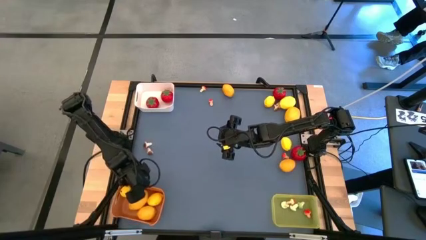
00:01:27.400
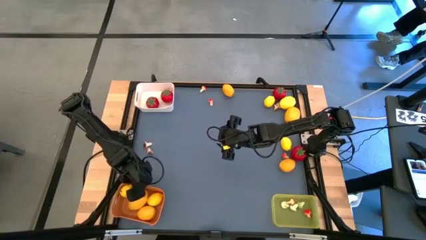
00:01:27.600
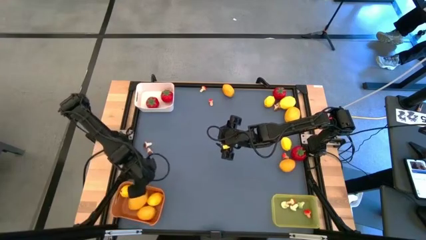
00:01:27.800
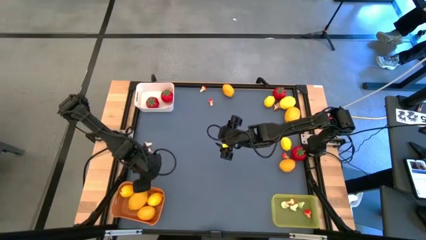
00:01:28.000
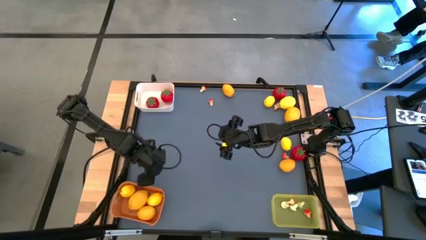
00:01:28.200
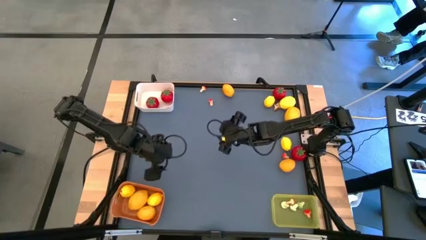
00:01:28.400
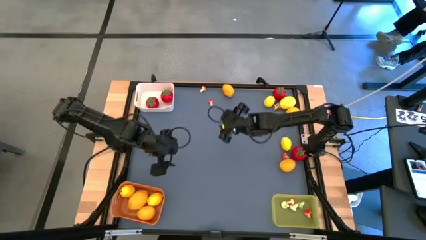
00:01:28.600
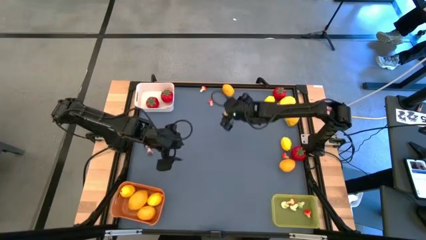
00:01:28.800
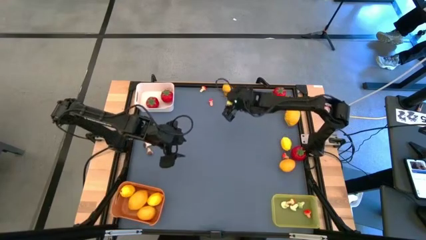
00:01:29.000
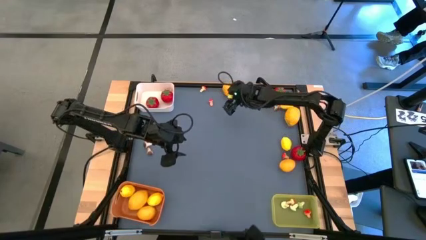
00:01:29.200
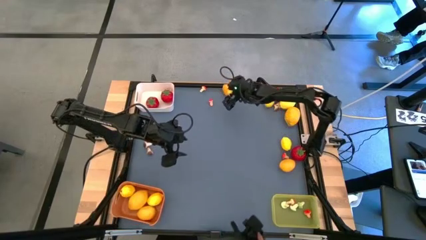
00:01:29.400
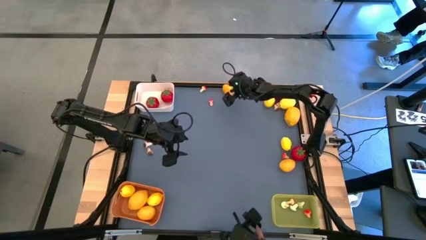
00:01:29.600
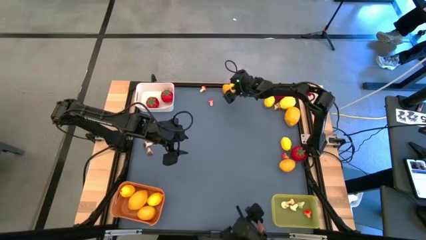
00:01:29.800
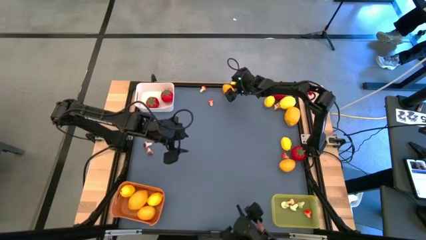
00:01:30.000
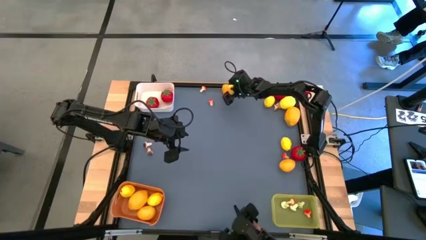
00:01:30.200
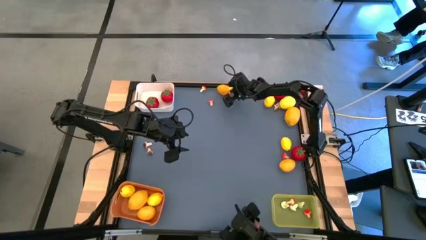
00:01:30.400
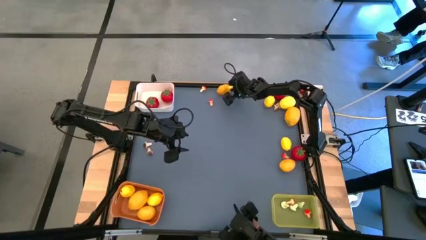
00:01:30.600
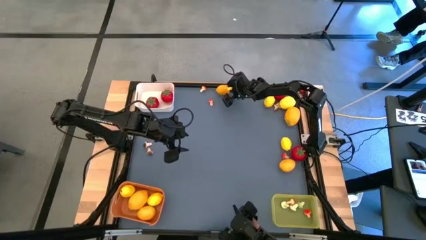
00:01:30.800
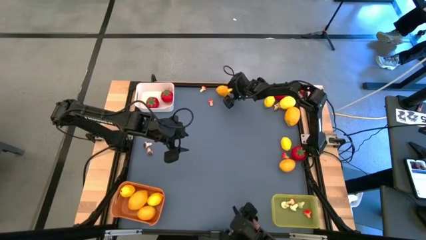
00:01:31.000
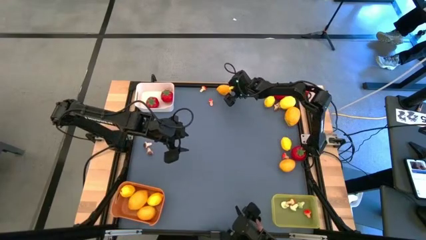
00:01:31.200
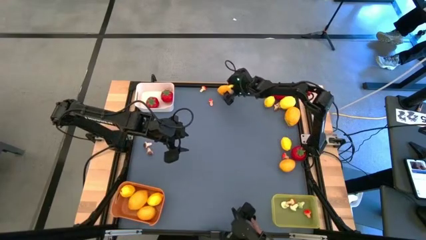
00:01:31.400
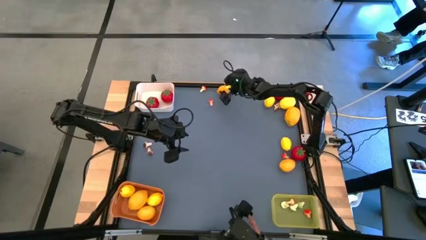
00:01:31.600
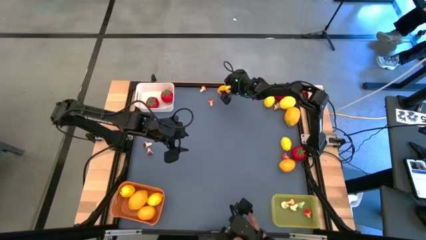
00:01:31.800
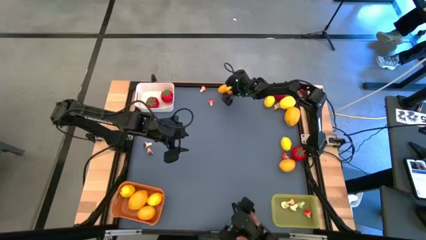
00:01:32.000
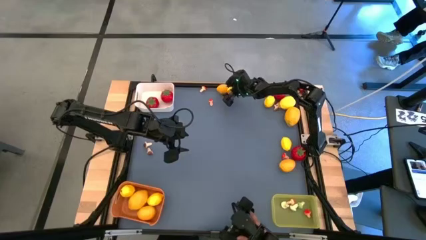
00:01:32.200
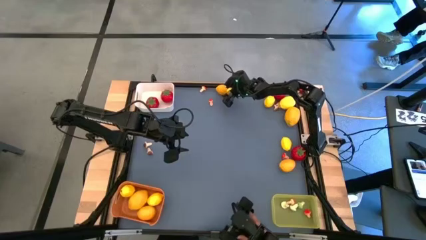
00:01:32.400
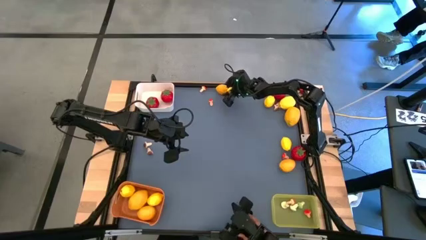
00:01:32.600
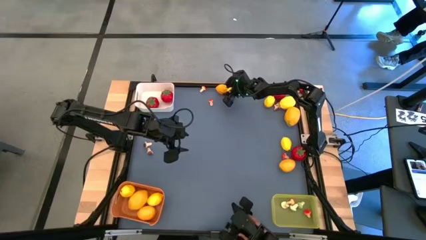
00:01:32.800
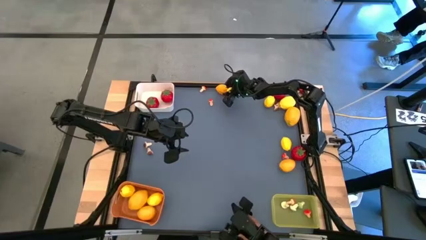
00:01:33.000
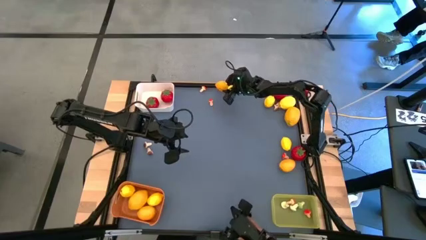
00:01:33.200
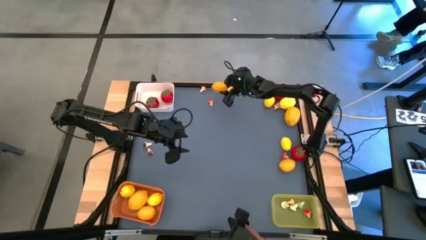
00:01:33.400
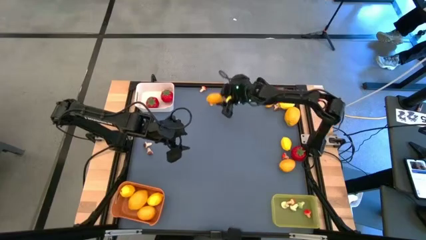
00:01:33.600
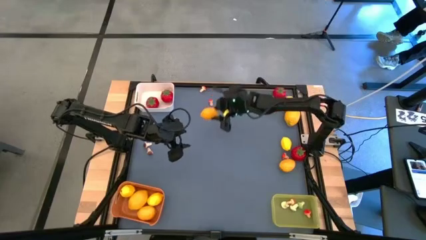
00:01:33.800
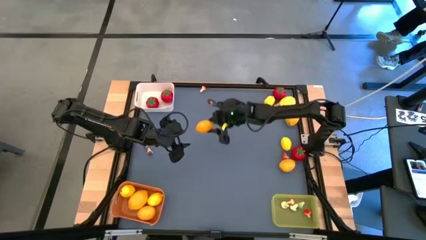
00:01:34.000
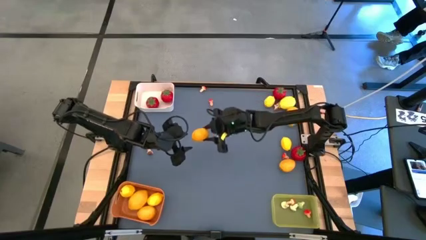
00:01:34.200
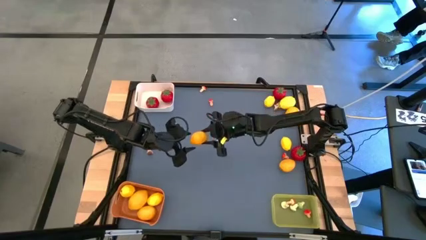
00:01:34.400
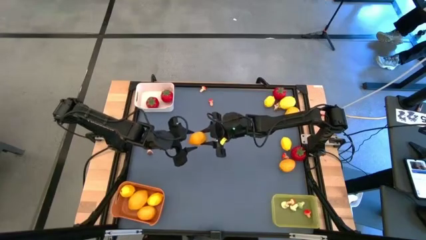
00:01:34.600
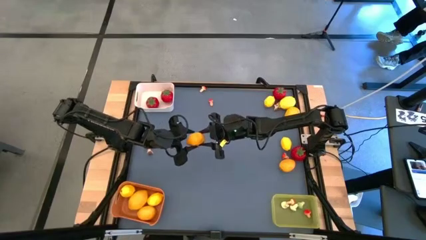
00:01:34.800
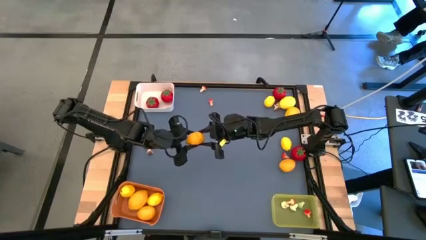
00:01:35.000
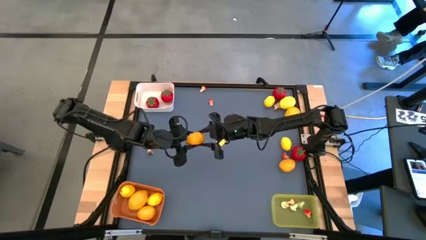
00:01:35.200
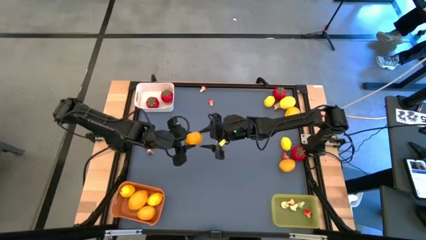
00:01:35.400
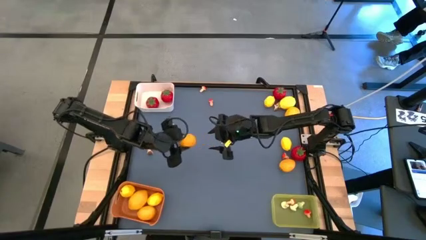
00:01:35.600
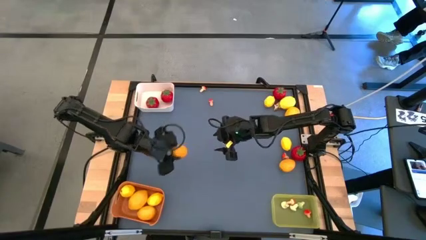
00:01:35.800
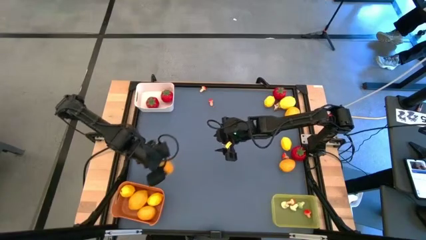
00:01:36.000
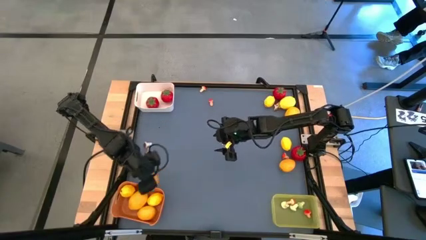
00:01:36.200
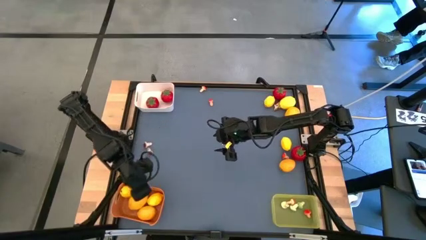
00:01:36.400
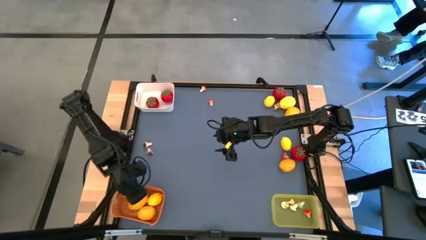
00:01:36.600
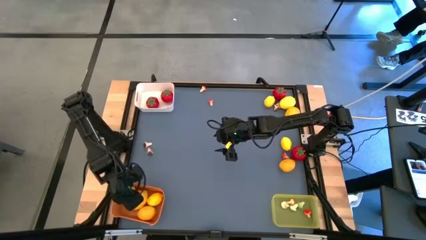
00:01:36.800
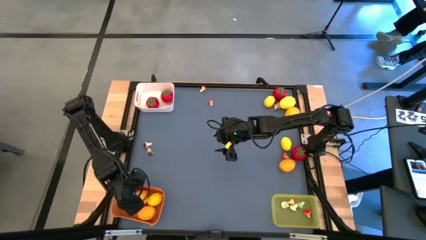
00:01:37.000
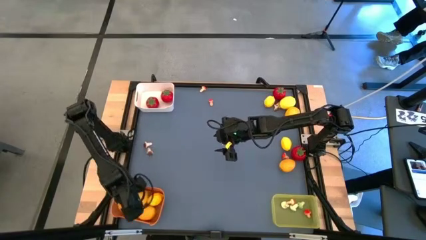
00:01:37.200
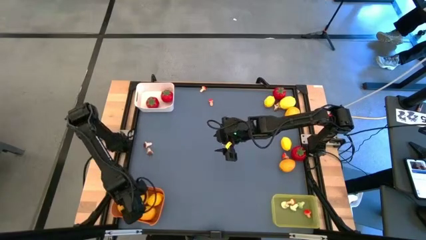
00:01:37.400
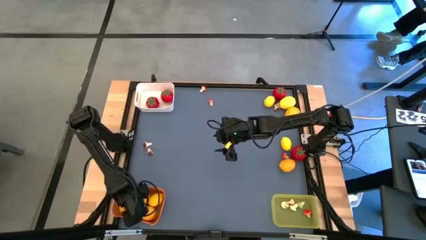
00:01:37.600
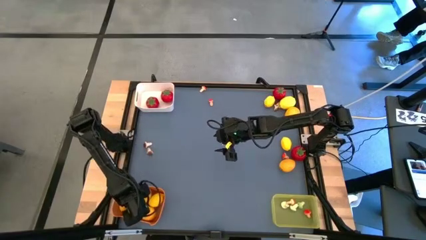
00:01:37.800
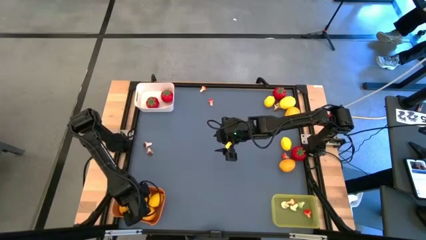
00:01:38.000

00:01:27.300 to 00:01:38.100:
Task: Sort produce into baskets
Put the yellow lemon into the orange bin

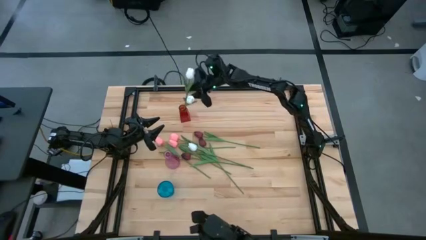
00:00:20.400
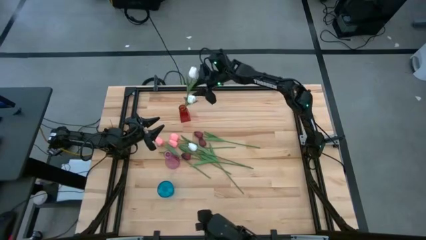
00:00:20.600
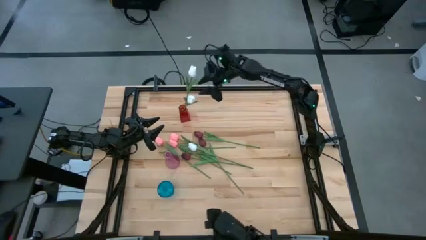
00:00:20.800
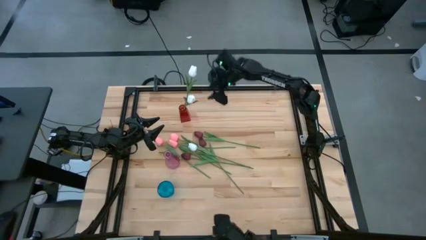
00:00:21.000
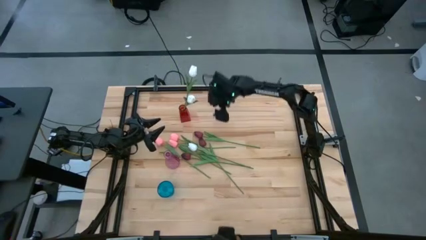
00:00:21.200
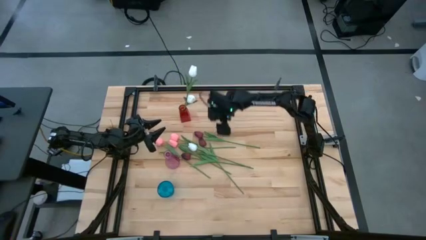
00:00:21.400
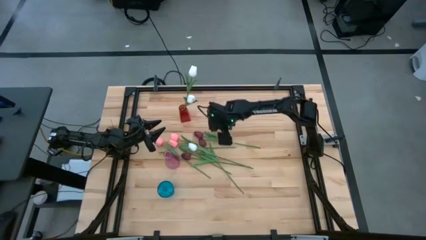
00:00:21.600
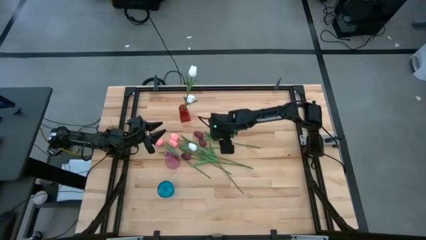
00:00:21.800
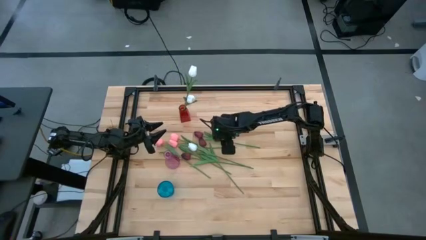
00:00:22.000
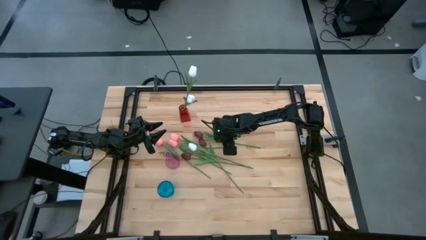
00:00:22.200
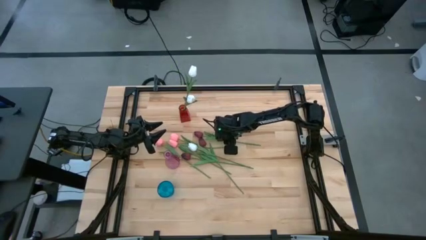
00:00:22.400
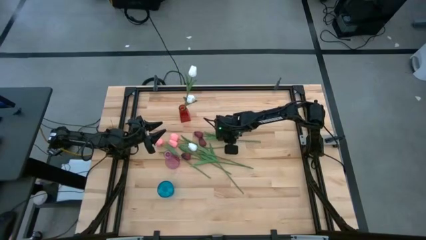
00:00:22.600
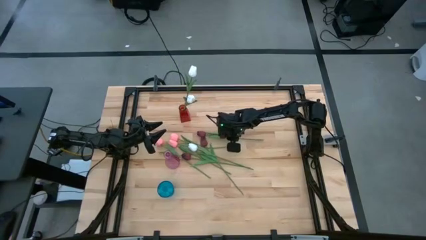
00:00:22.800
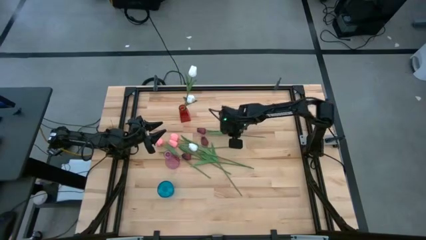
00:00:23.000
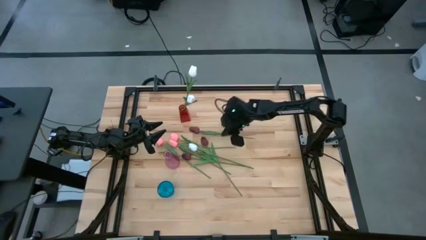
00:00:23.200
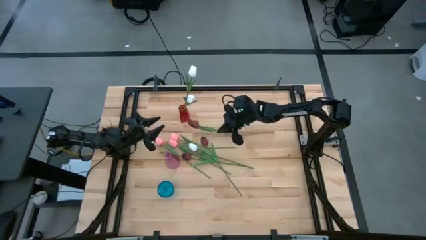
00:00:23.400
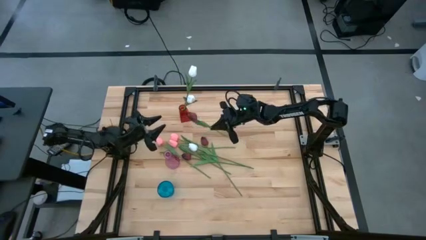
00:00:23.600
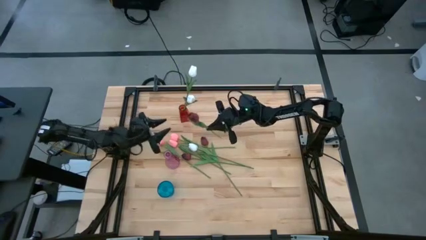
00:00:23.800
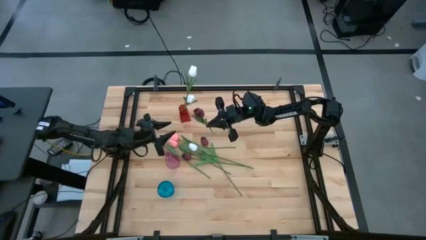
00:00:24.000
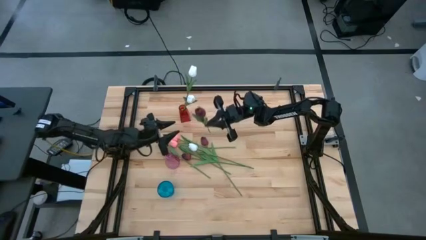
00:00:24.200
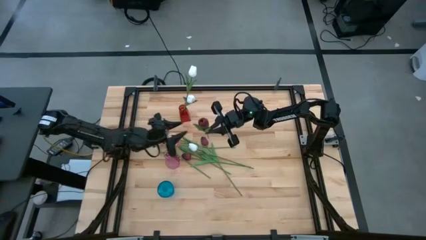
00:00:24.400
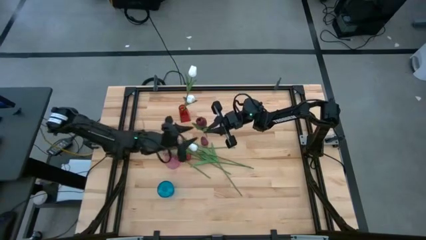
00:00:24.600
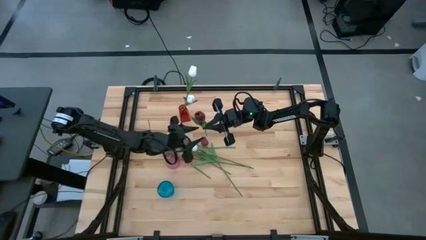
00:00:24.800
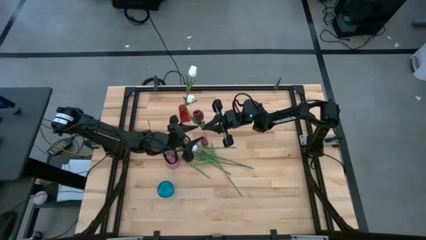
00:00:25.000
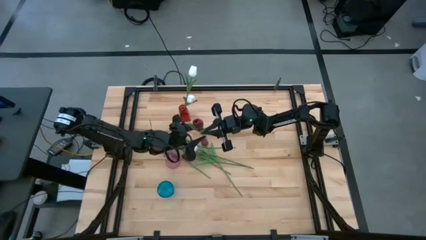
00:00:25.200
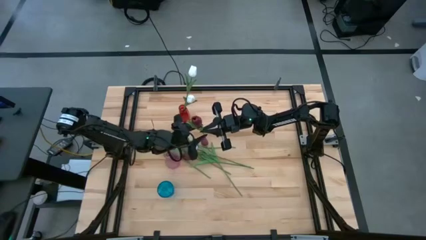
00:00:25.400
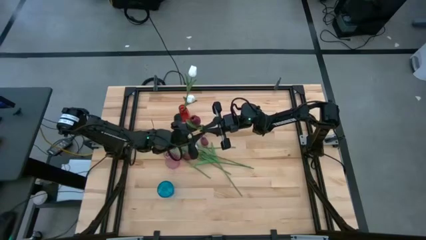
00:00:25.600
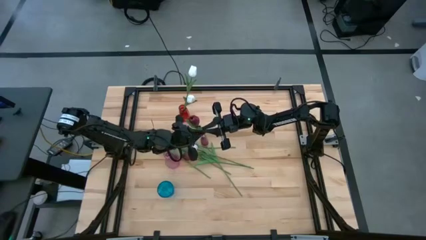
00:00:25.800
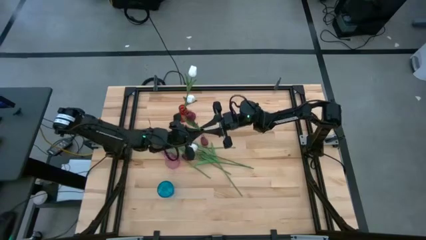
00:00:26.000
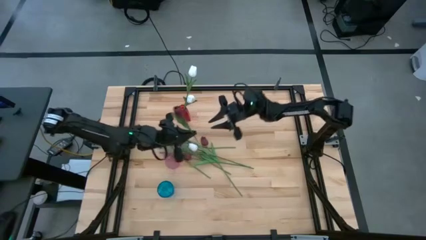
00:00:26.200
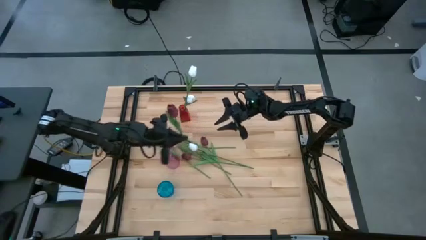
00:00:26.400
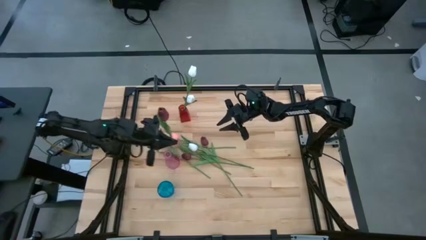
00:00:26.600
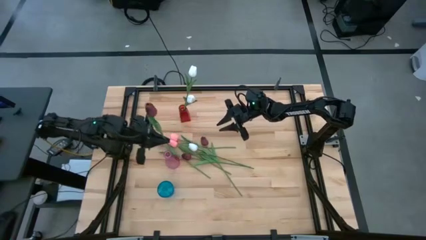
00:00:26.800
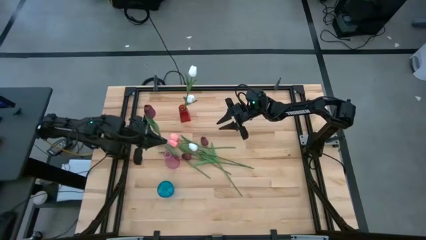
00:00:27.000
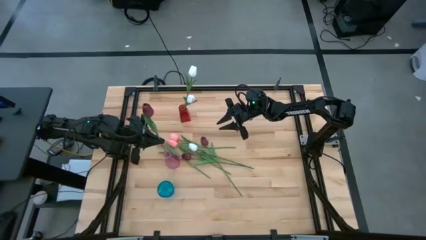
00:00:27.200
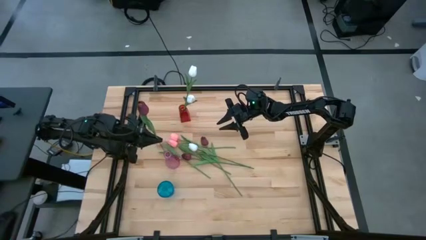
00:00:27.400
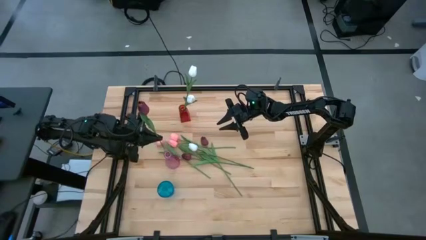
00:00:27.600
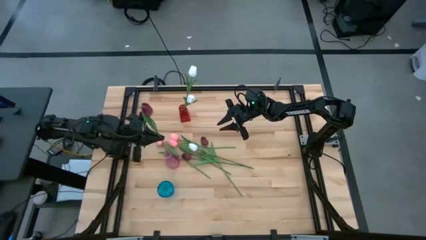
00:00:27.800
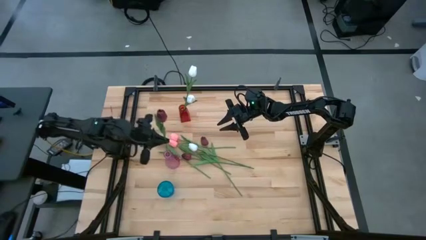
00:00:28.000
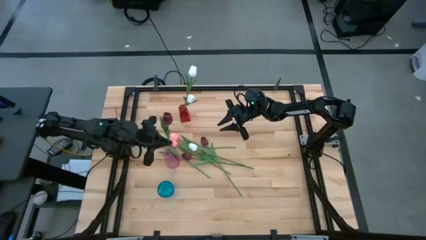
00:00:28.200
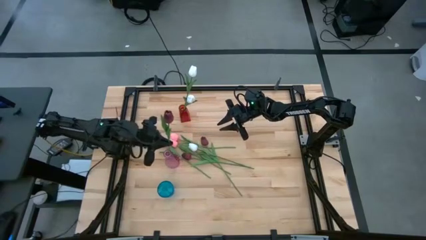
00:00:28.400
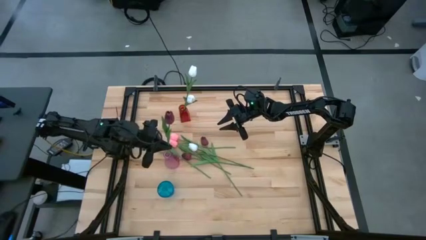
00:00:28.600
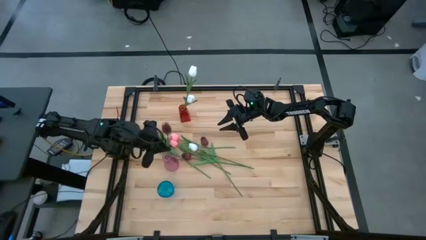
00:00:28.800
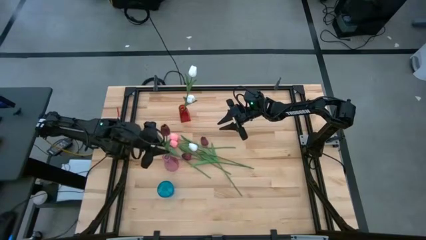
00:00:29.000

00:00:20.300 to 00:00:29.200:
Task: Sort flowers into vase by color
Put the top dark red tulip into the pink vase
